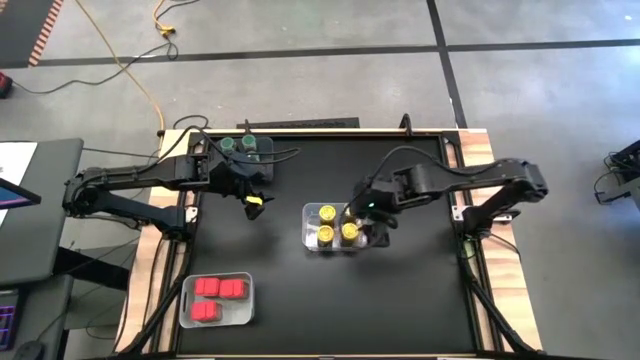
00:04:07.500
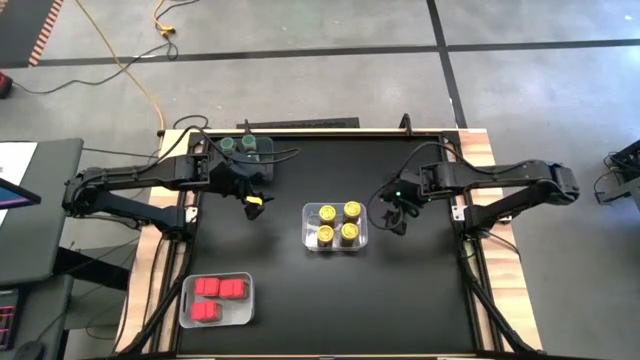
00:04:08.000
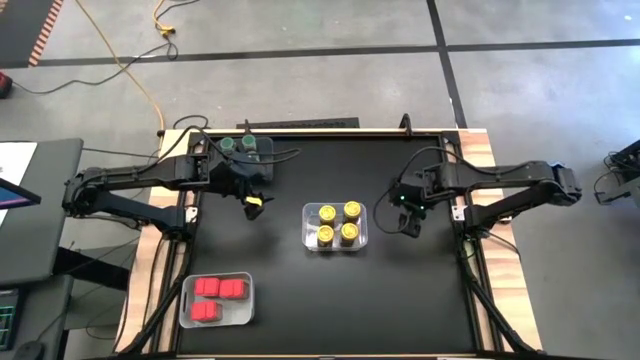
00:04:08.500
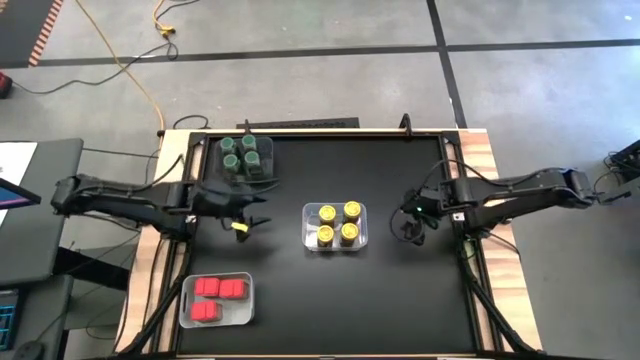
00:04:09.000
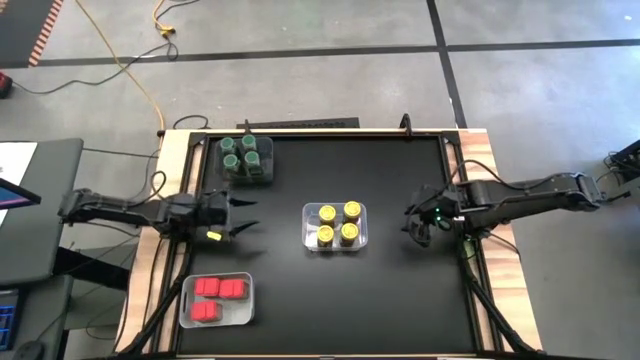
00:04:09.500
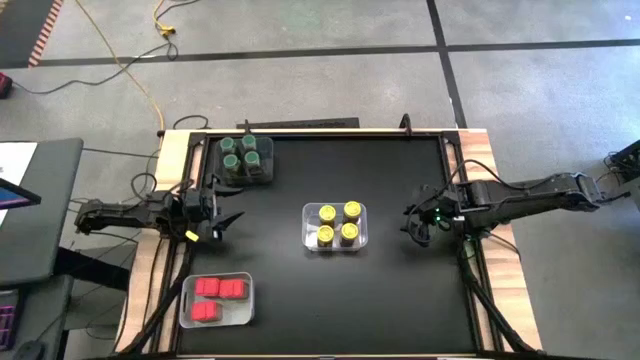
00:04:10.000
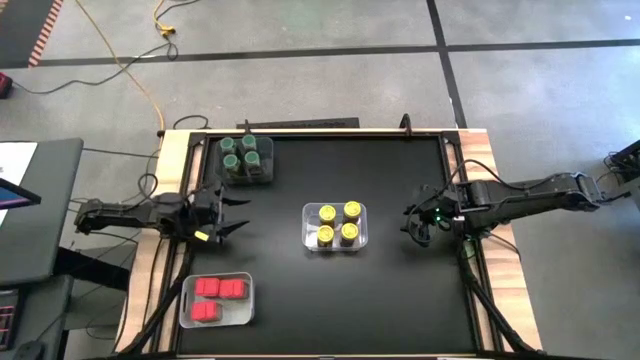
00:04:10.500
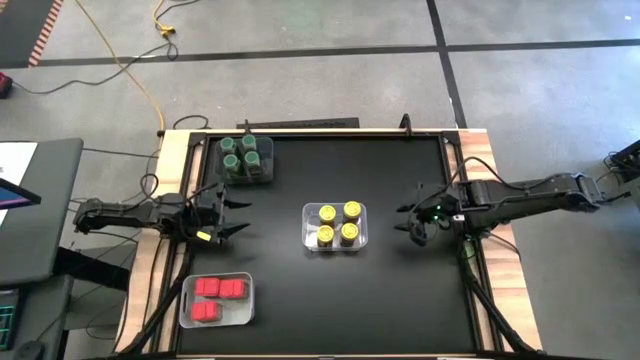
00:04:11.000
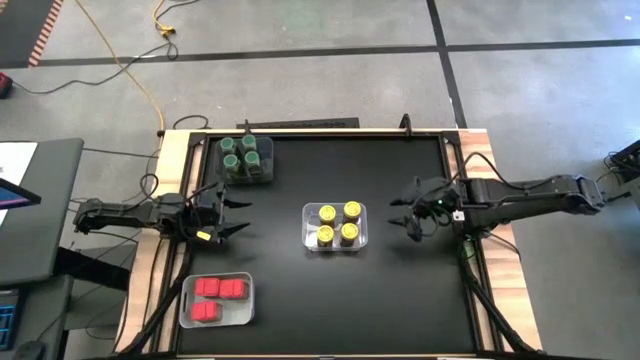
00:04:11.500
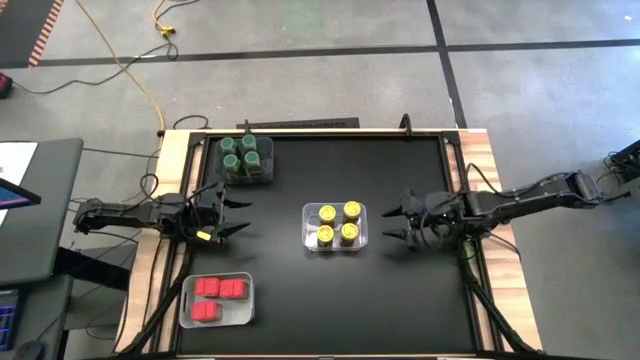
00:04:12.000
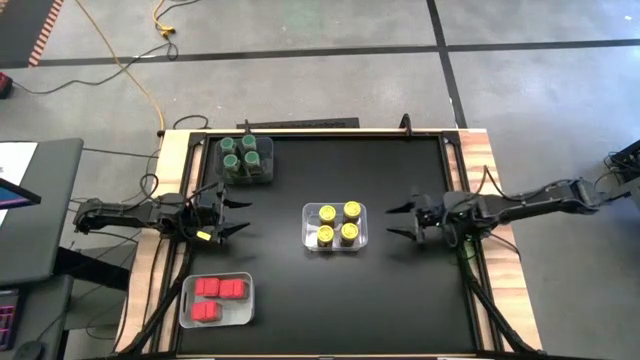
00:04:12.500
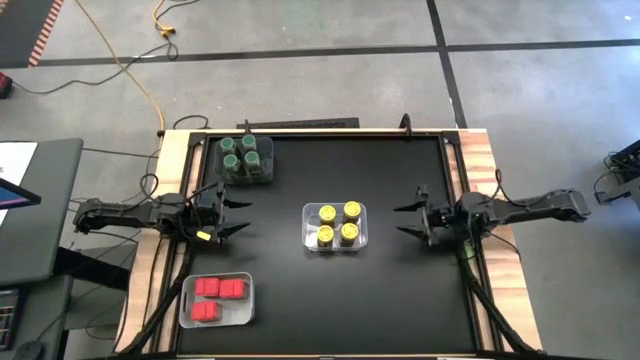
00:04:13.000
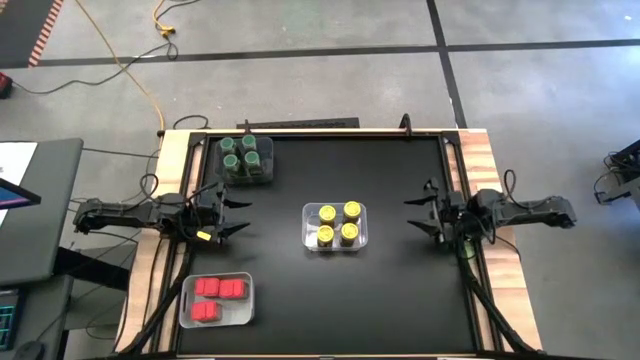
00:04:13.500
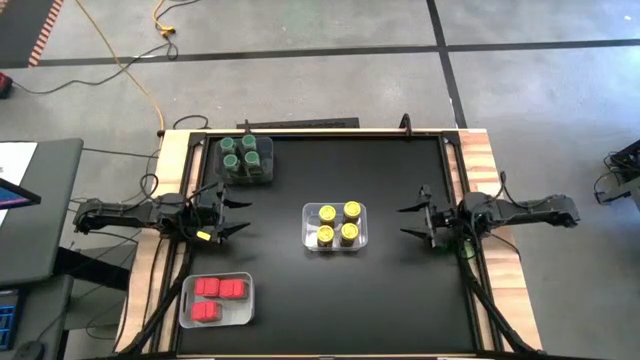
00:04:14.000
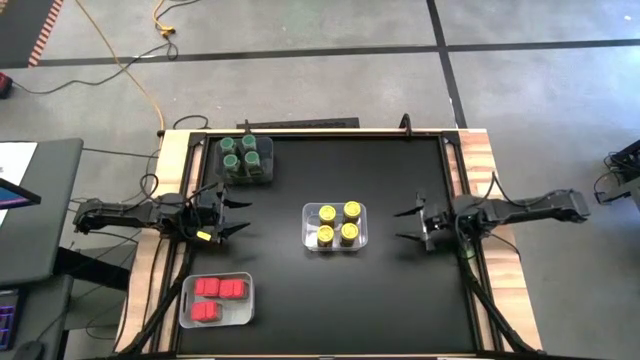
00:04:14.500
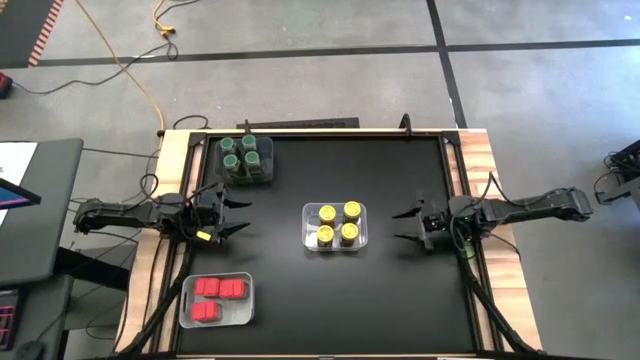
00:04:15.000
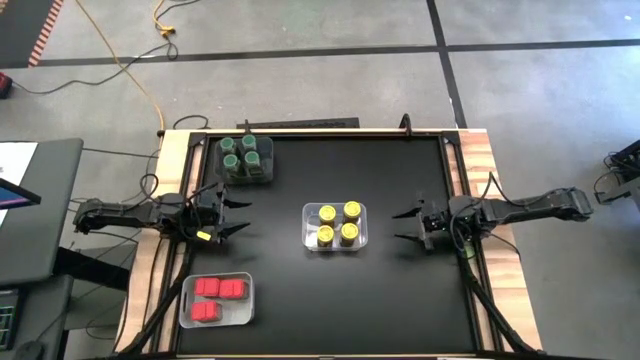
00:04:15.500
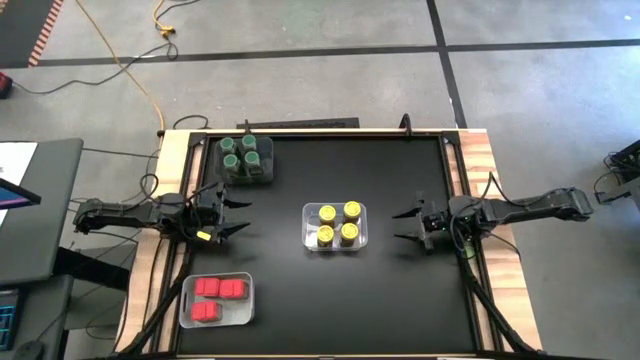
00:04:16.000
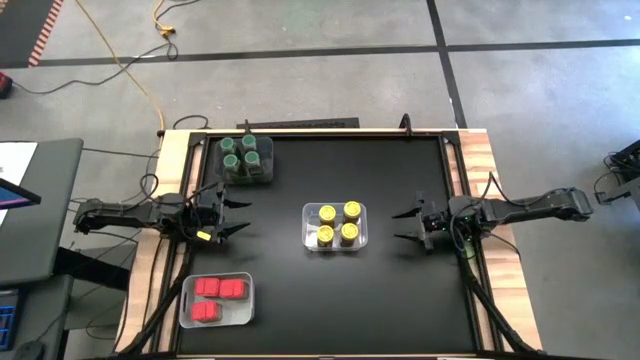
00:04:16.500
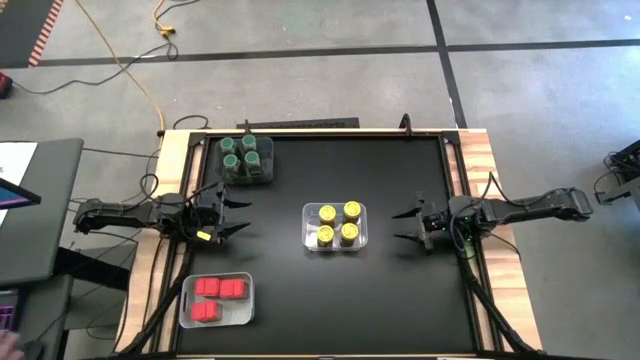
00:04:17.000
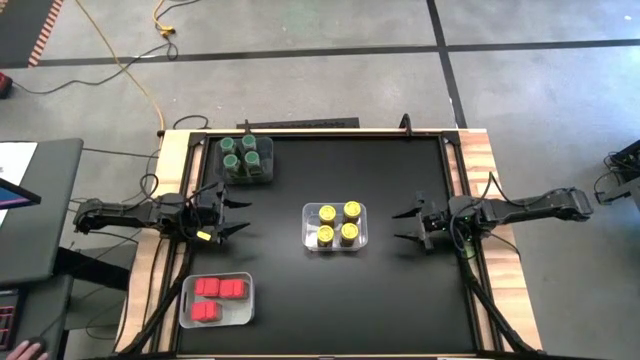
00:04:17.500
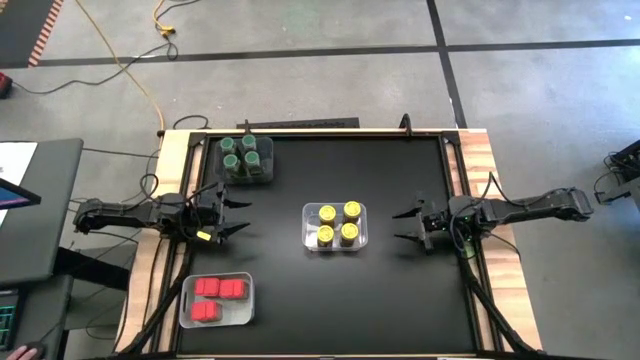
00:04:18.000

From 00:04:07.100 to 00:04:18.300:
Task: Sort spices by type
Return to Home Position

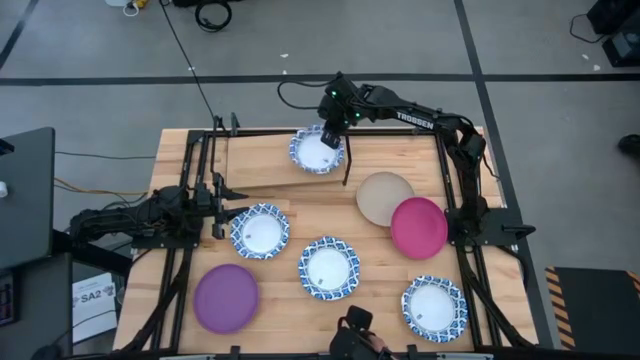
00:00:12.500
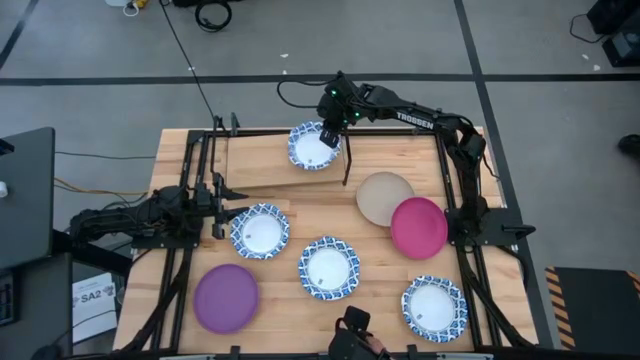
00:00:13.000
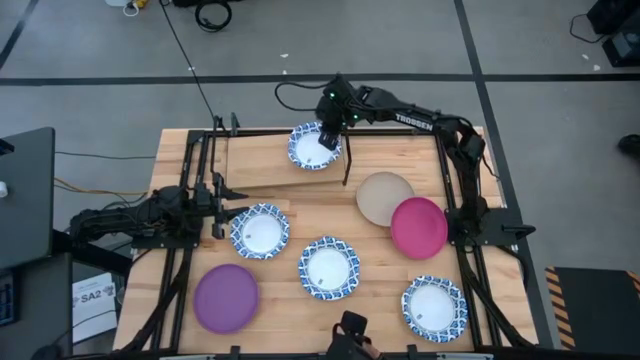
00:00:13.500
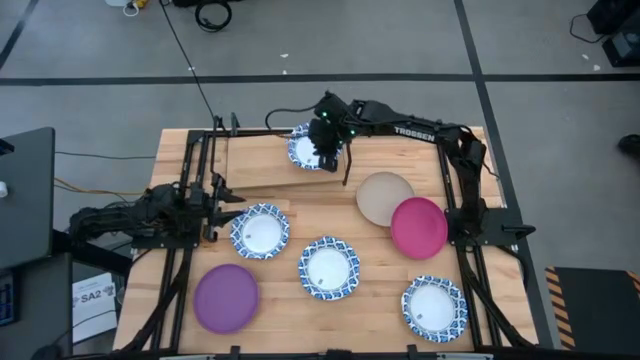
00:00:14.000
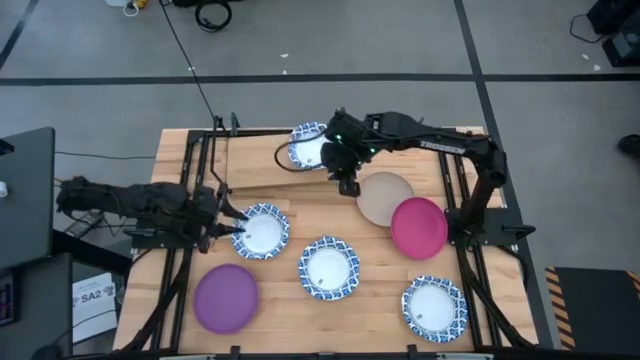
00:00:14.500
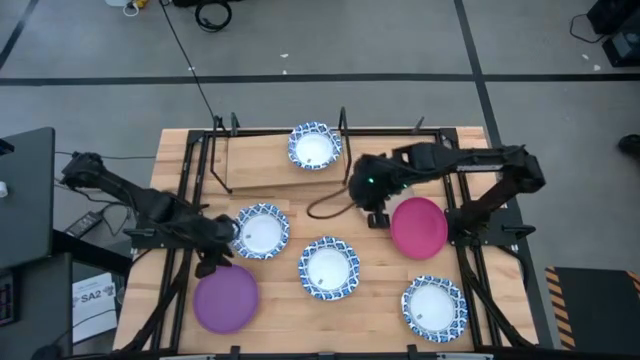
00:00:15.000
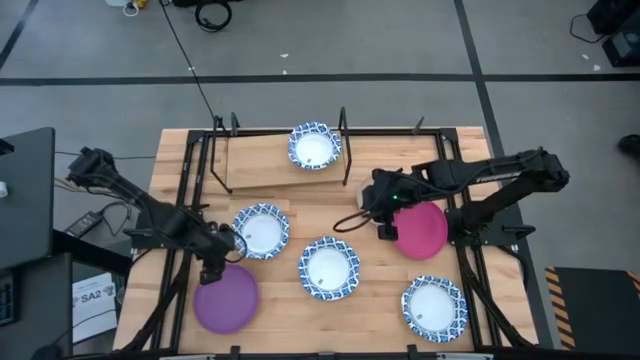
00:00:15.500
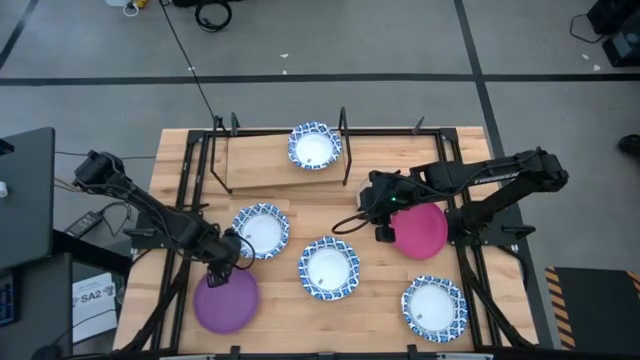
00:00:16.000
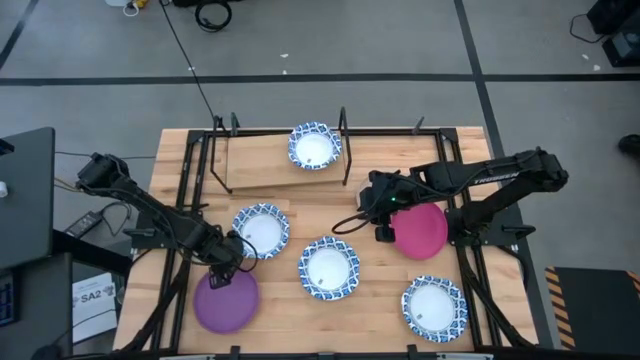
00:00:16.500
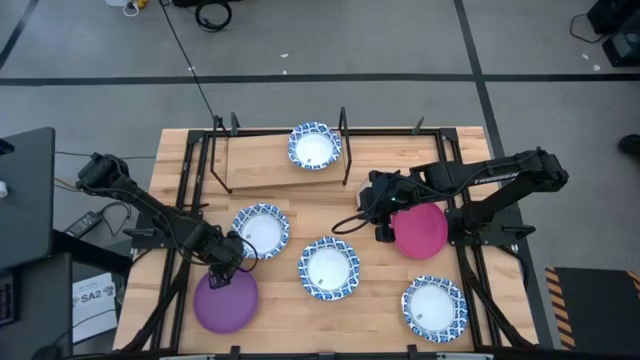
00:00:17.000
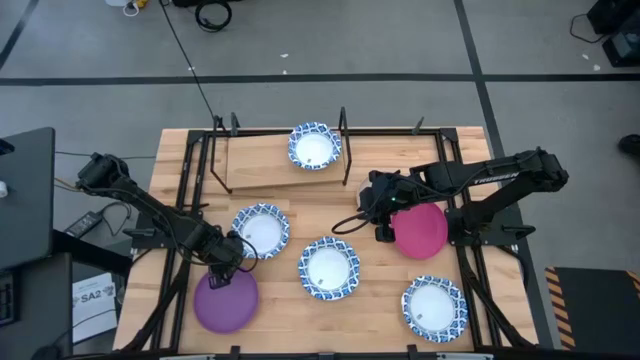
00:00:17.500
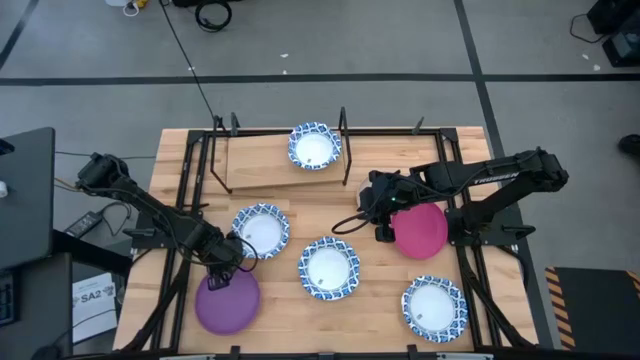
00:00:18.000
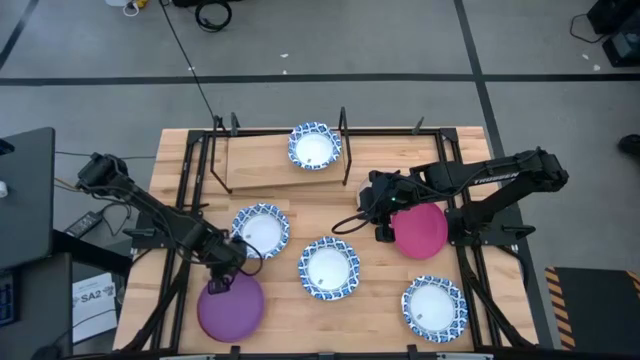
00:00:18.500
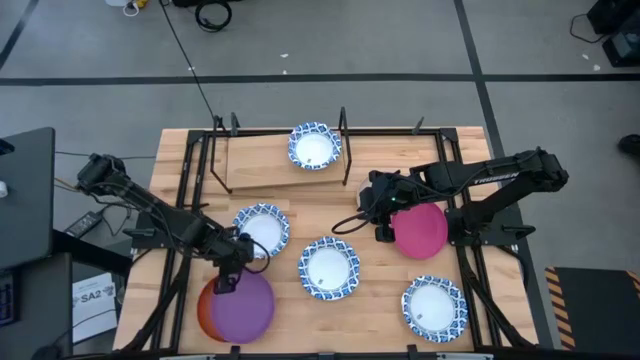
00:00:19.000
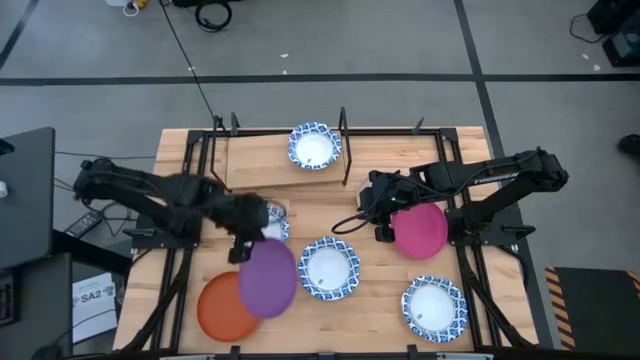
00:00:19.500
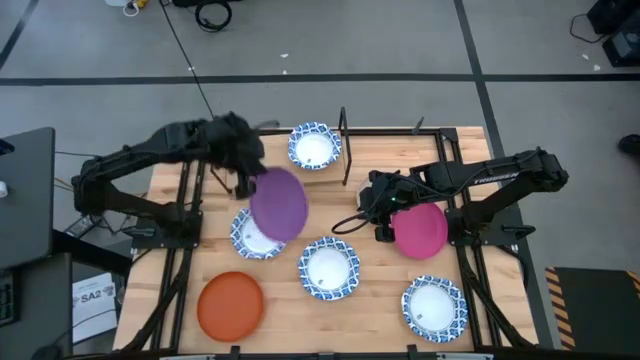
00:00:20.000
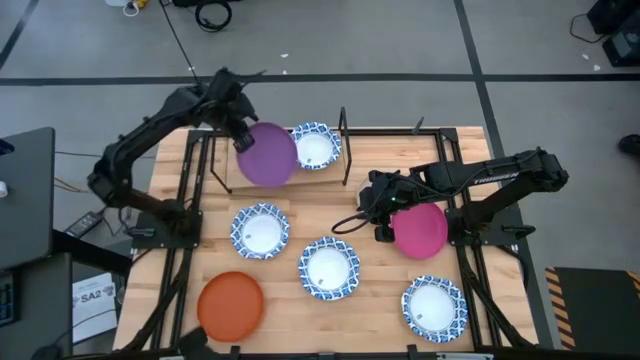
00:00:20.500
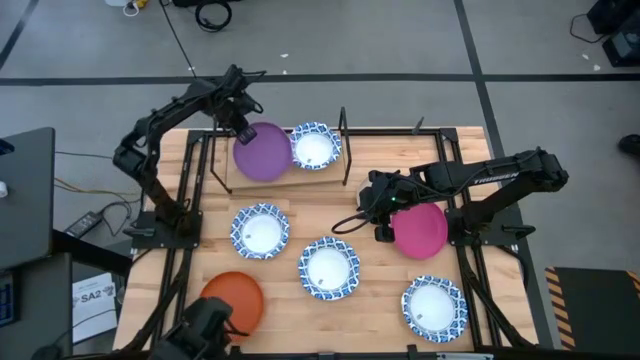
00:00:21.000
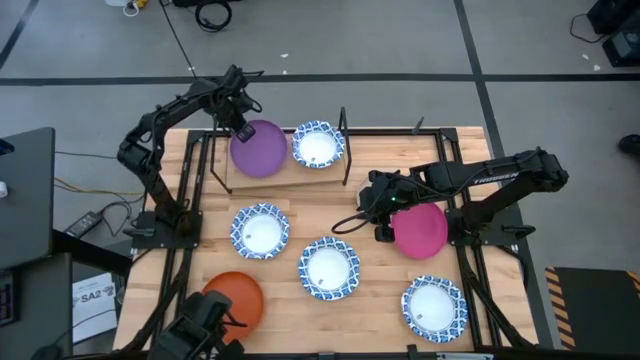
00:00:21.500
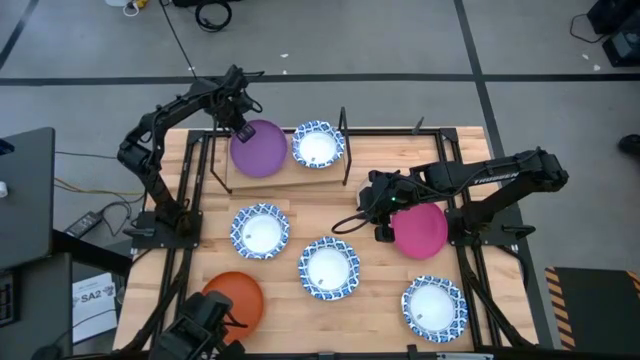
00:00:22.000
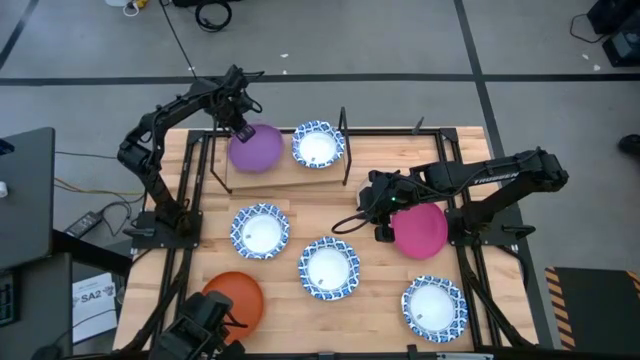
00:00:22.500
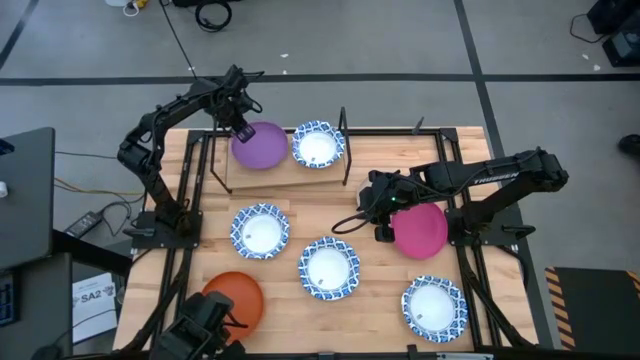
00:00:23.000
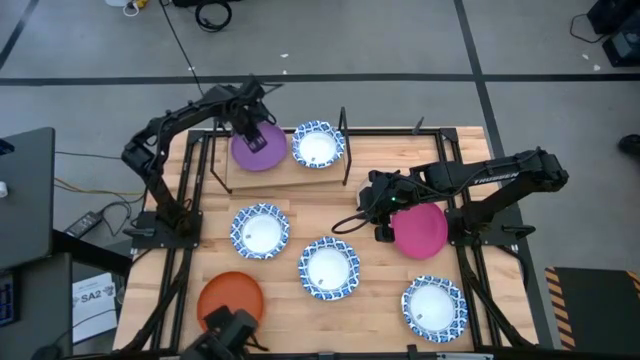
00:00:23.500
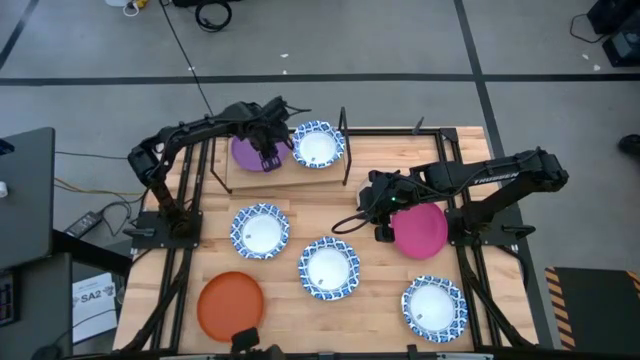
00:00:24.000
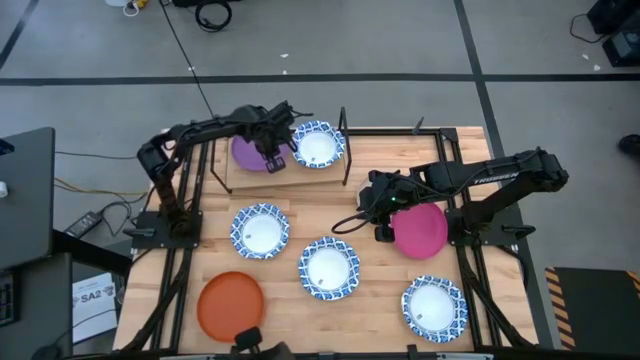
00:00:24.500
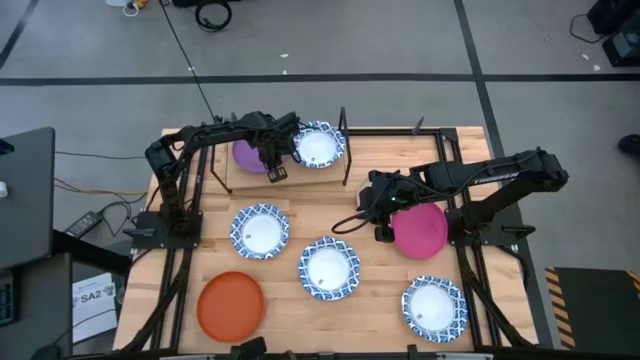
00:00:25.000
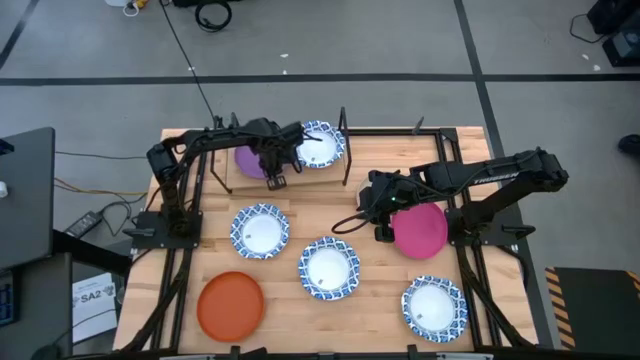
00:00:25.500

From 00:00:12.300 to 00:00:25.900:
Task: Place and stack plates onto a shelf
Put the violet plate on the shelf
